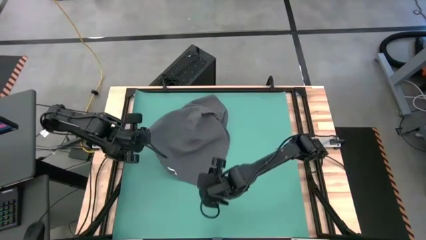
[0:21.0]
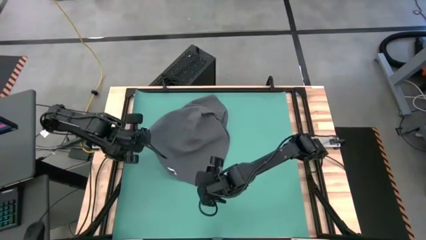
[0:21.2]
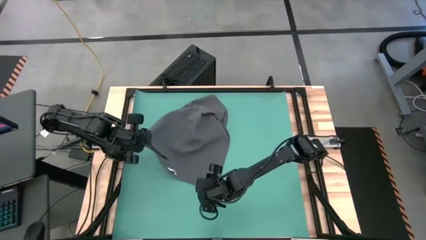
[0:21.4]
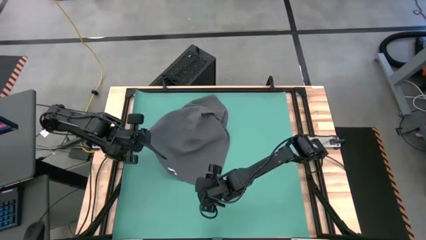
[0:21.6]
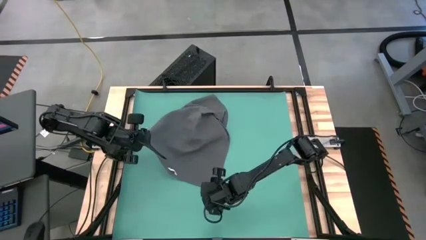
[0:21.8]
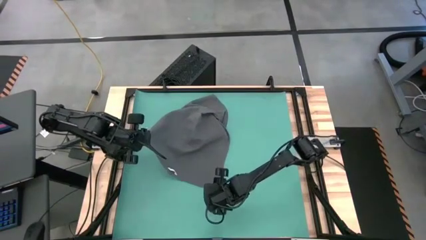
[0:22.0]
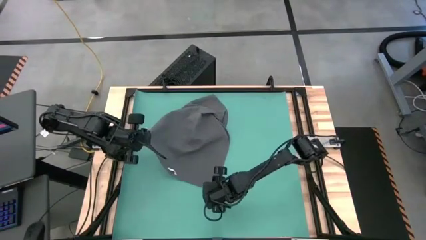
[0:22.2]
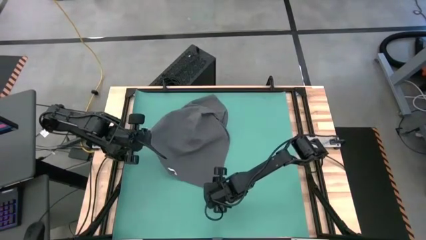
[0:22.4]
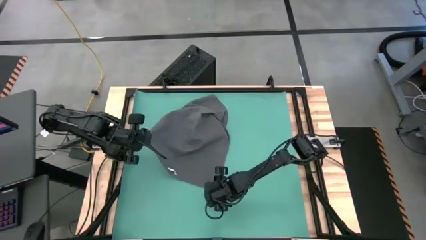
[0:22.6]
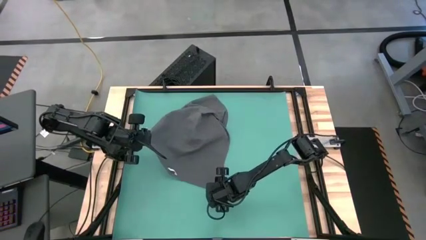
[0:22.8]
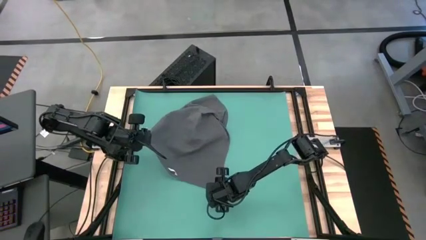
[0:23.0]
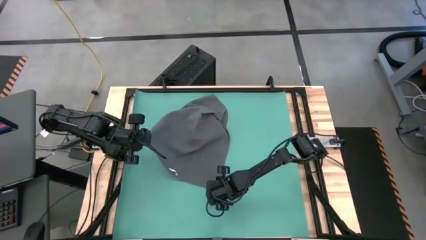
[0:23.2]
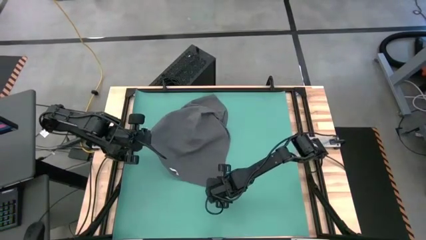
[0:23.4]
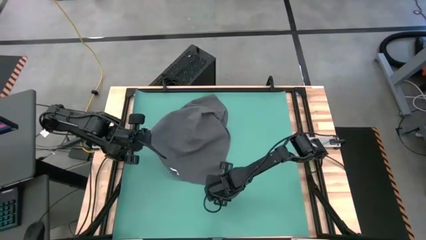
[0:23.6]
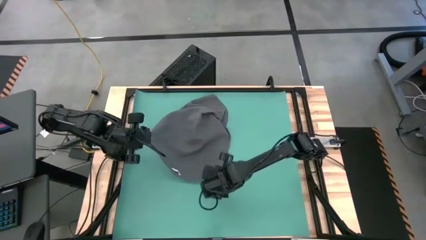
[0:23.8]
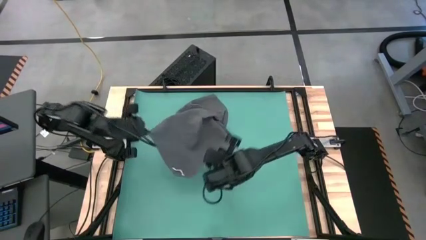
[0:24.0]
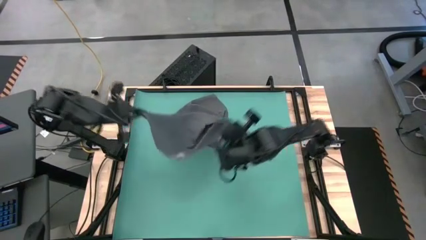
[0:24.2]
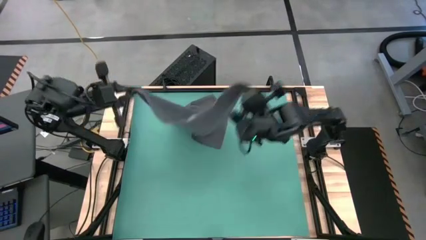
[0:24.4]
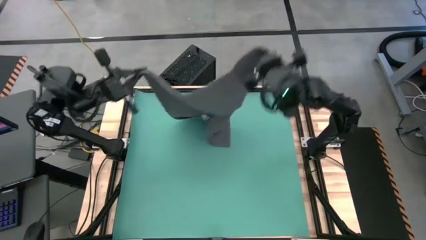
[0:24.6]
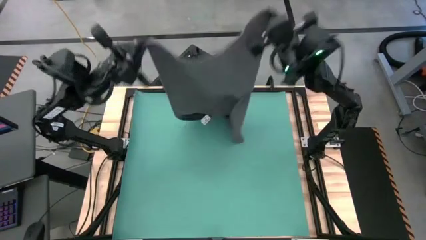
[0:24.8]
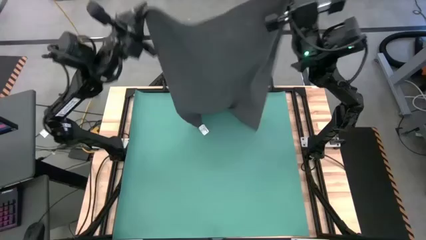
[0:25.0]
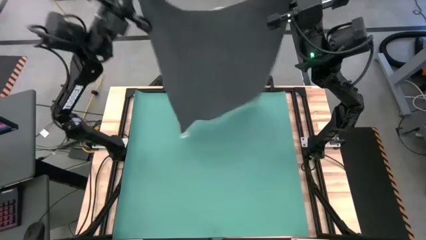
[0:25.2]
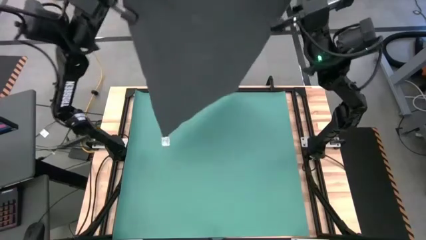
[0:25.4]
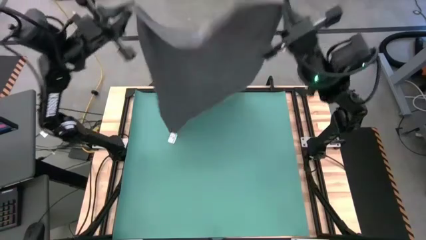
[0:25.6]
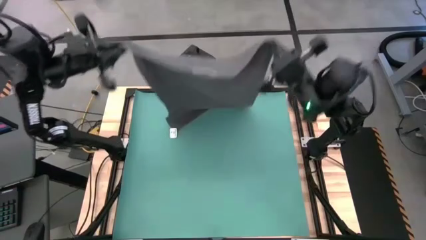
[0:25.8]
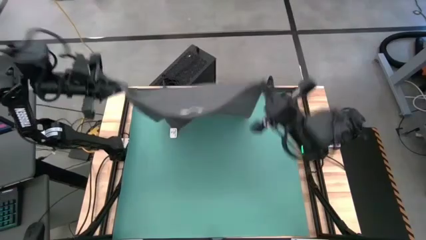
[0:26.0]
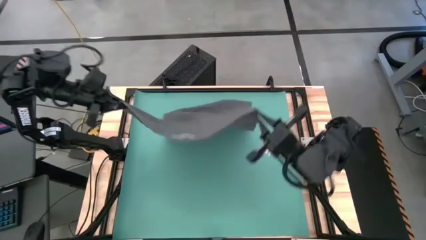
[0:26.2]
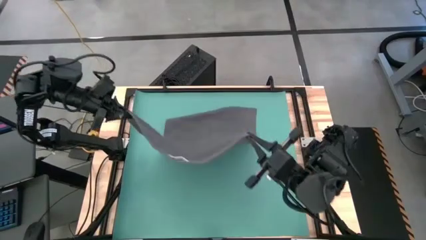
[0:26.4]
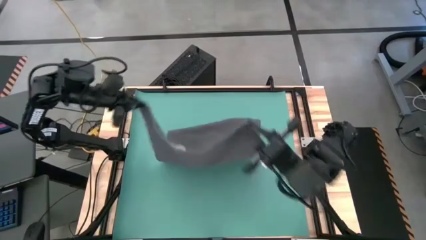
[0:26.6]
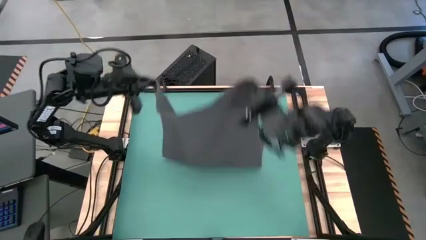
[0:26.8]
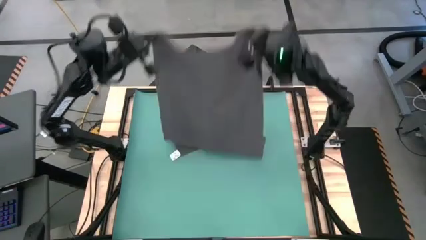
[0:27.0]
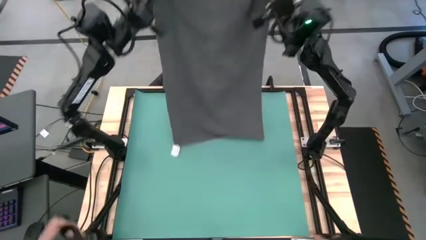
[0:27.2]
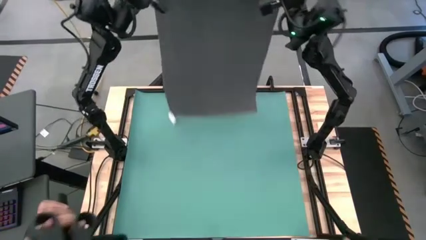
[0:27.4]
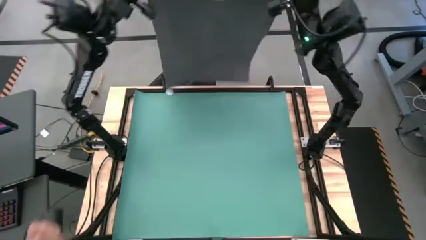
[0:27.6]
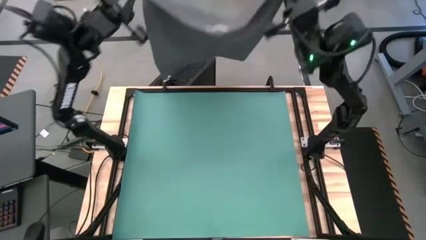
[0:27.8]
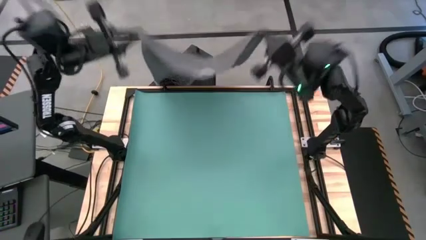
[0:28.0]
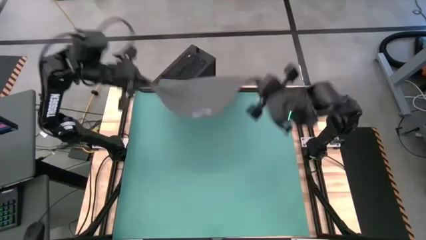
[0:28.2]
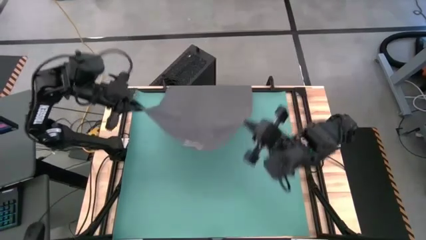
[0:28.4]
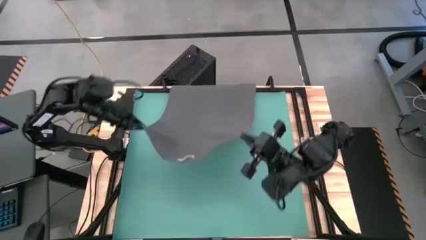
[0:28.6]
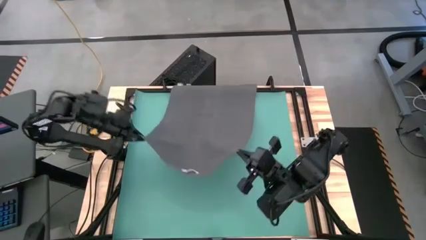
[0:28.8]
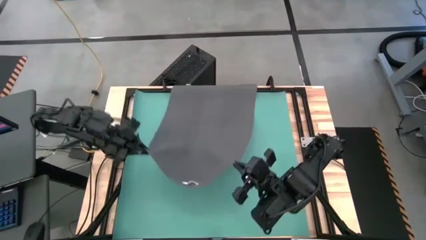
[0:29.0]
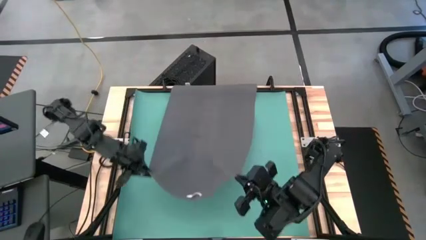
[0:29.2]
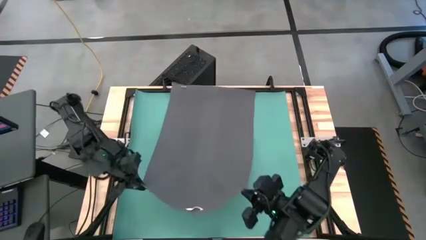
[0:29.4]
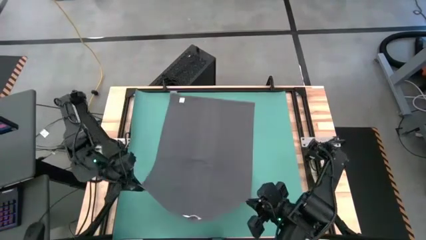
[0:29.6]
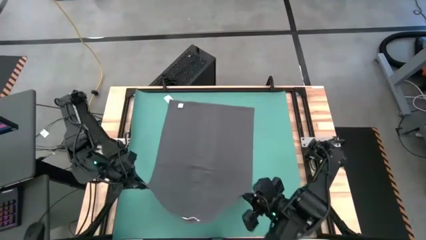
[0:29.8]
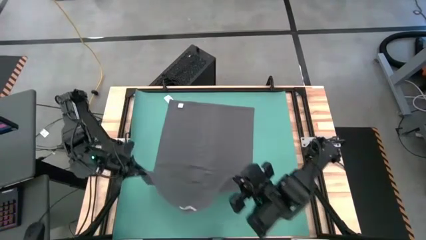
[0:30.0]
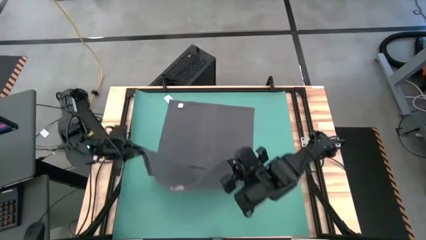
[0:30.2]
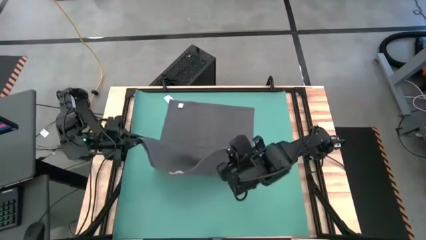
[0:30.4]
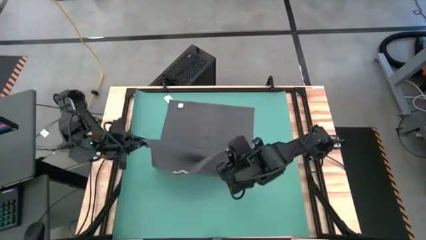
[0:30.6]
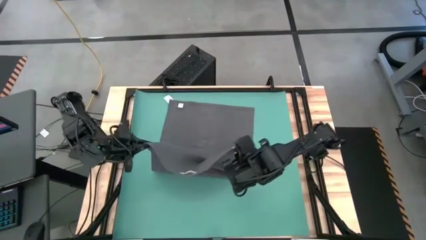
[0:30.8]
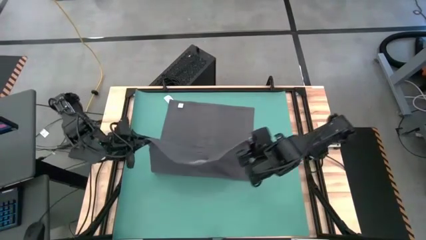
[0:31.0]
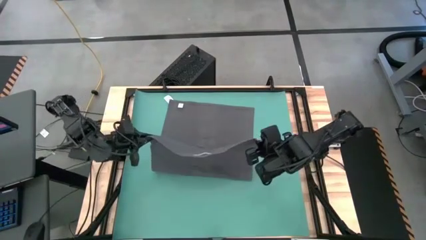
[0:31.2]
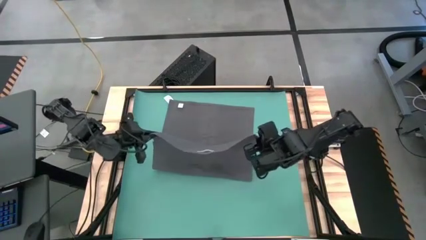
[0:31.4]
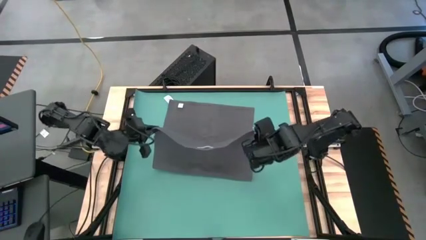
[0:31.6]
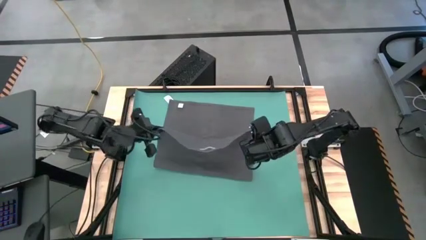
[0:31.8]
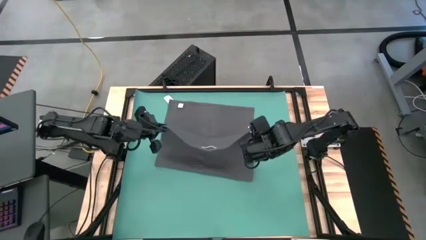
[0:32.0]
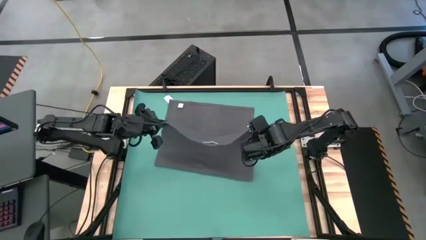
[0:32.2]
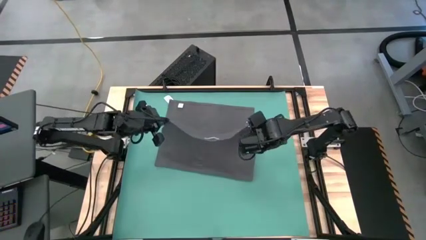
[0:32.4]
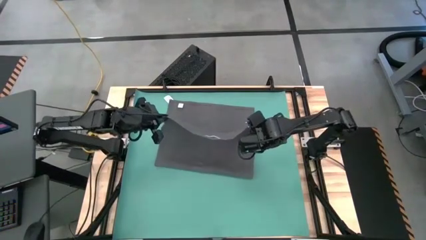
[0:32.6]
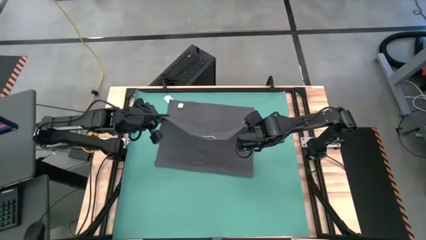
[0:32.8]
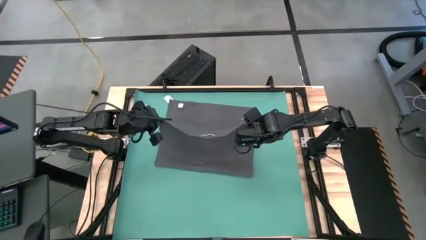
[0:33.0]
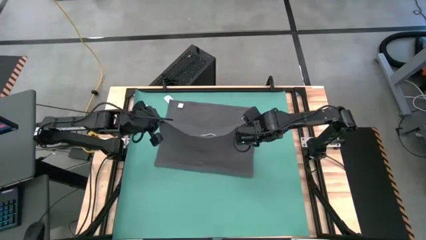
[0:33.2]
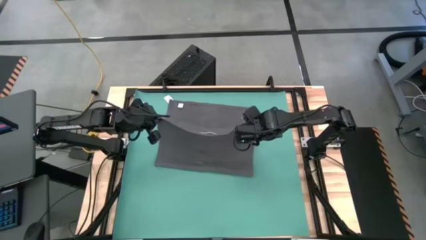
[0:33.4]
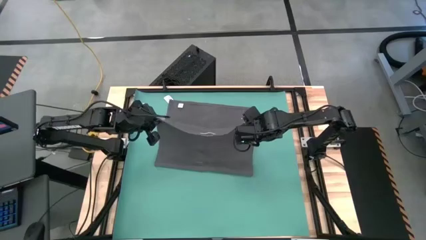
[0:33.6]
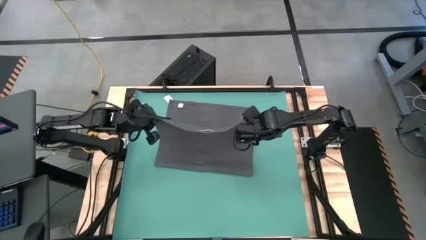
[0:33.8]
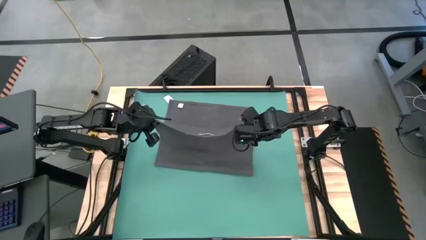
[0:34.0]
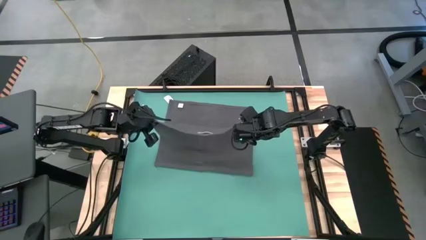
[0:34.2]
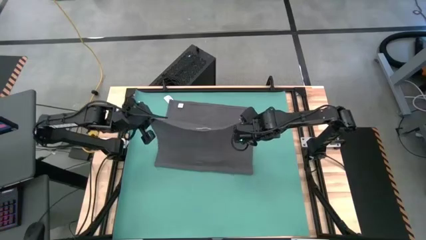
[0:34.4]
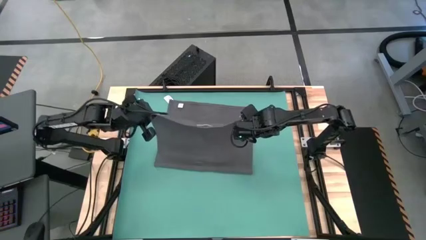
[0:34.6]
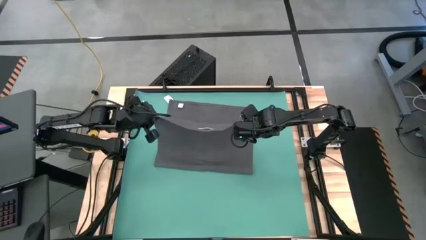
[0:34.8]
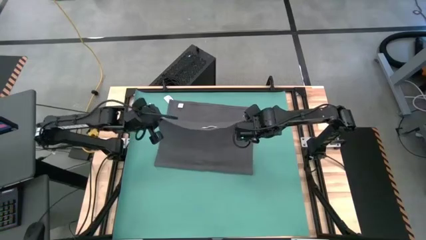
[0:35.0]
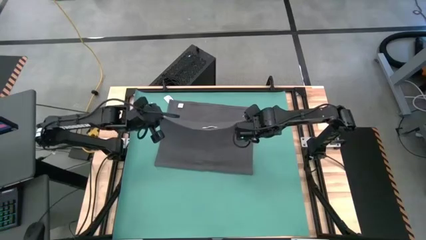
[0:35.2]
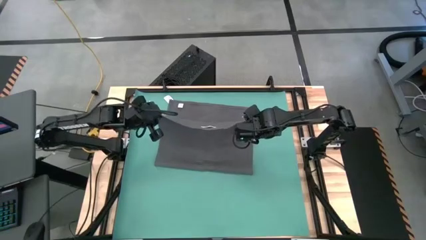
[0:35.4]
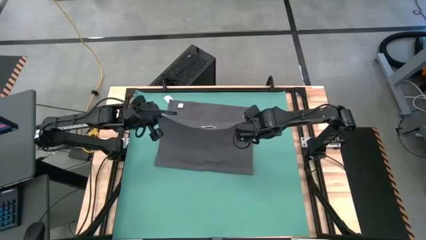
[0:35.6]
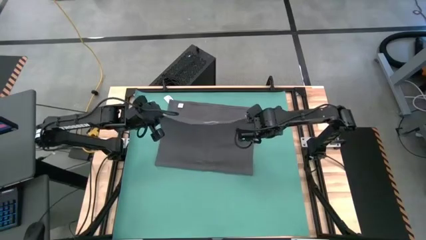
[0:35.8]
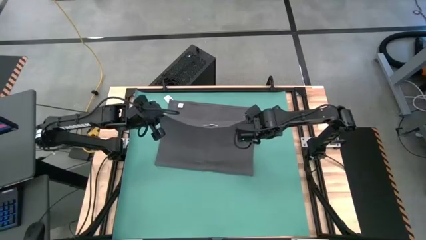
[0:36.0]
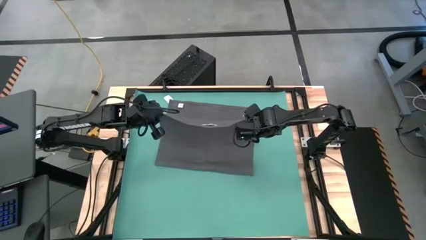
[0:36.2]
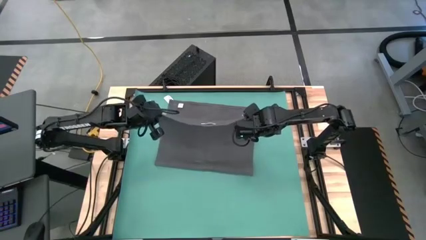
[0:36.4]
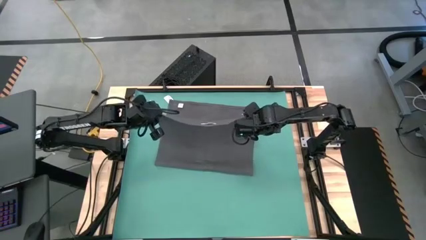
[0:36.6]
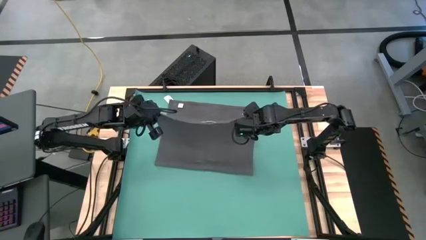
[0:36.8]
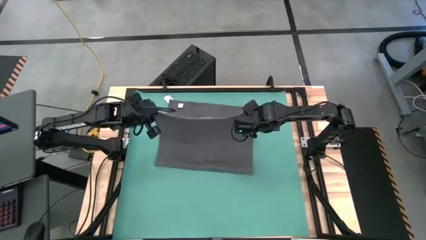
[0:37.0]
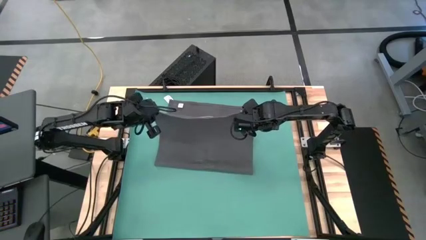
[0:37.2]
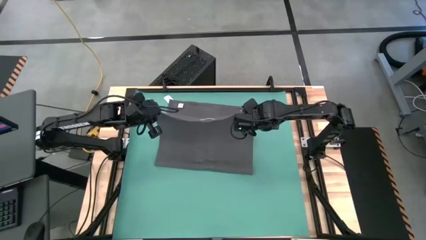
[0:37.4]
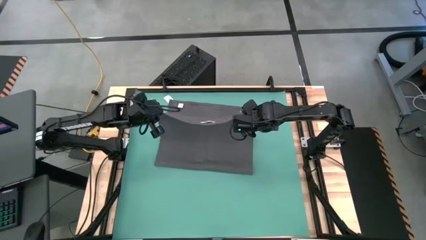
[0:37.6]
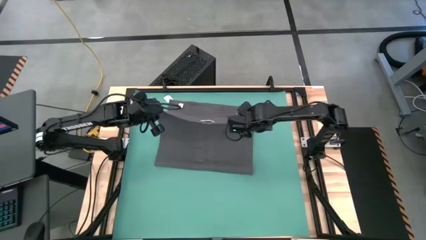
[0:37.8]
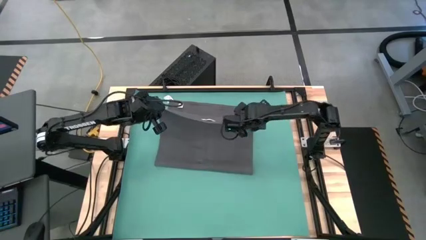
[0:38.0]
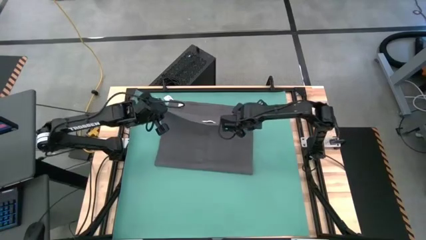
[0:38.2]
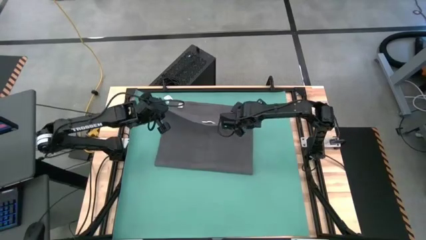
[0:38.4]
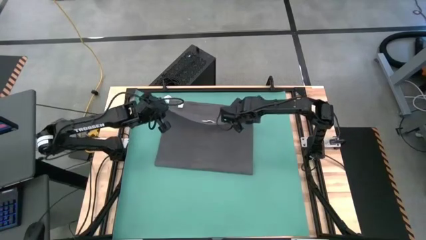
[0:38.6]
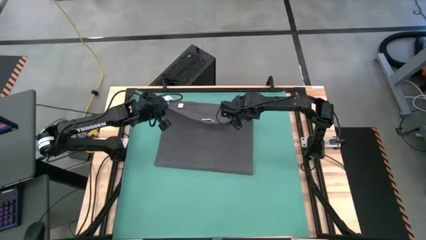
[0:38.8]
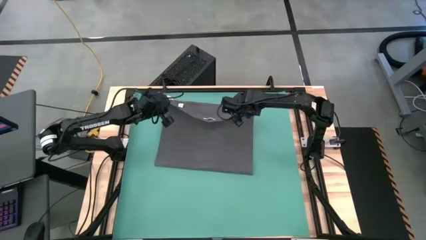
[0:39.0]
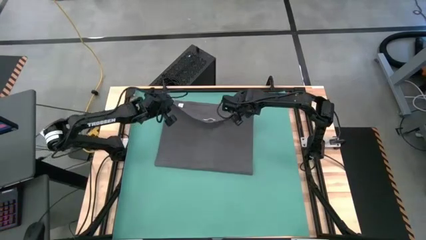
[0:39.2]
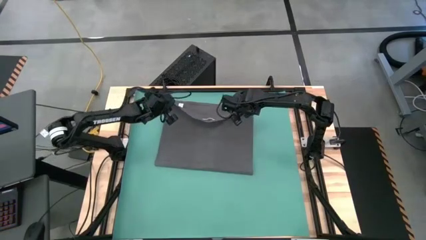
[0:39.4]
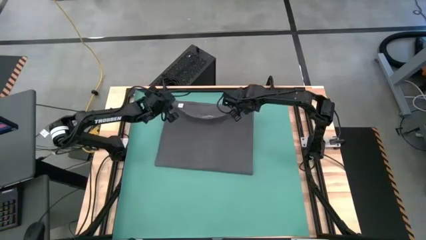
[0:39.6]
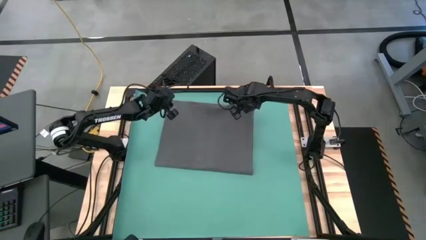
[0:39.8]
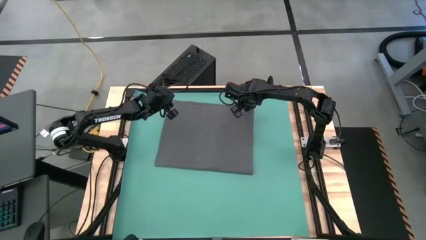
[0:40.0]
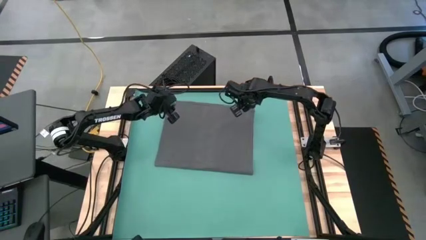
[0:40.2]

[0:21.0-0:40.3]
Task: Roll towel
Fold the gray towel
